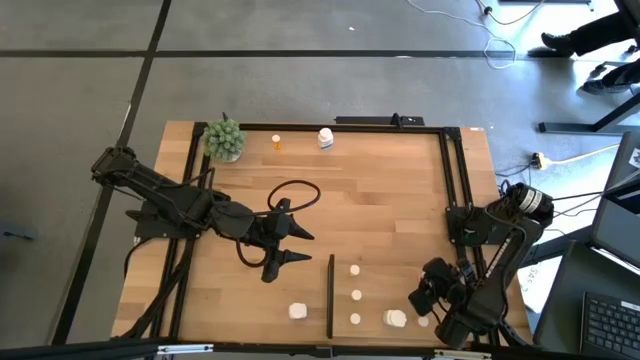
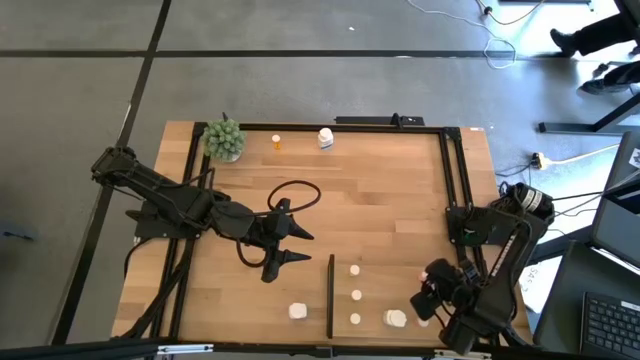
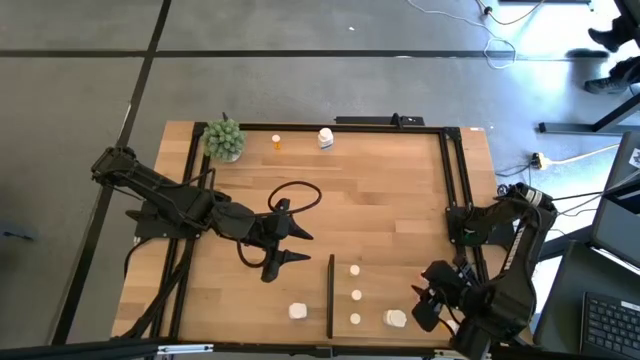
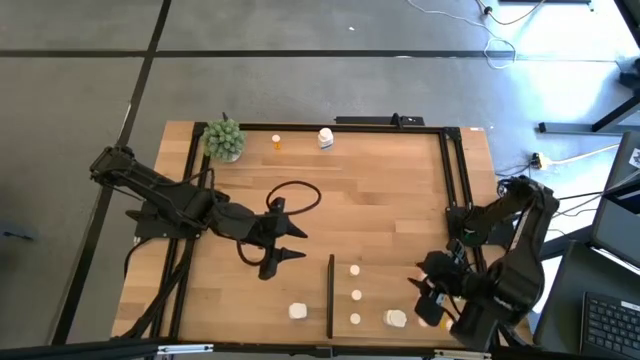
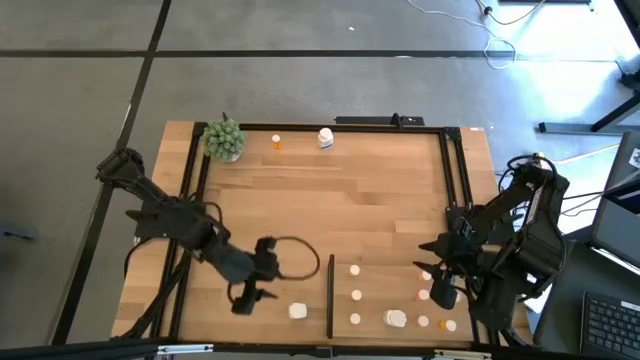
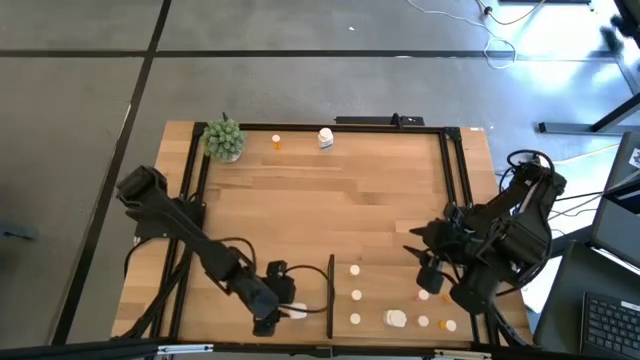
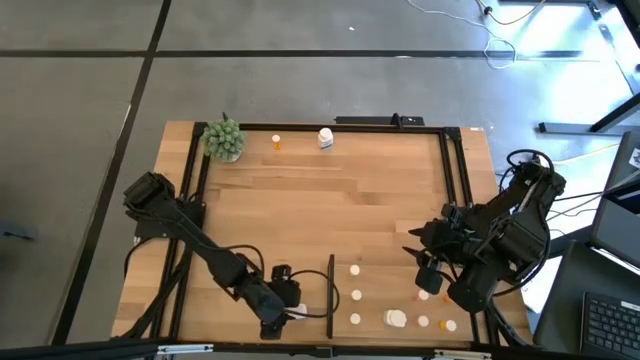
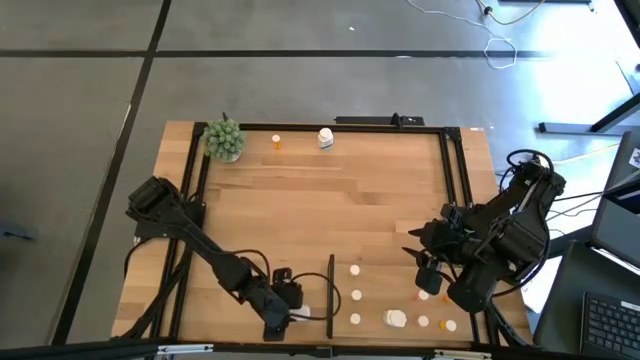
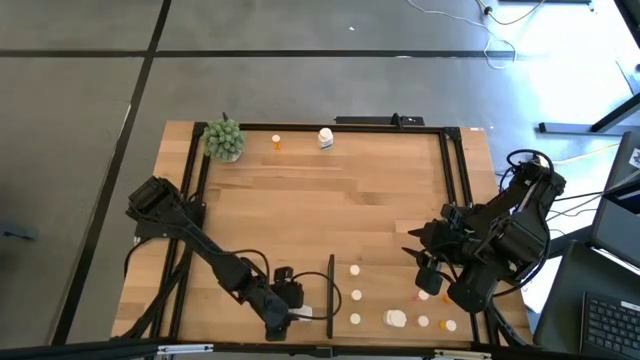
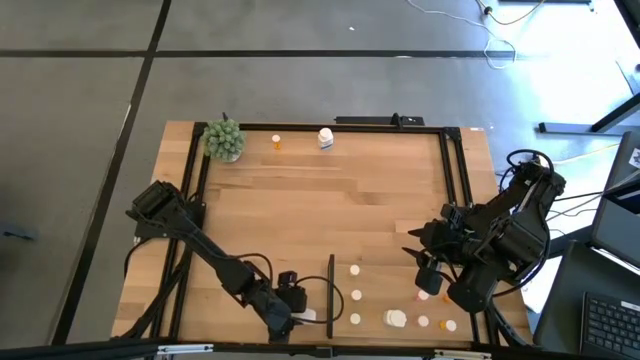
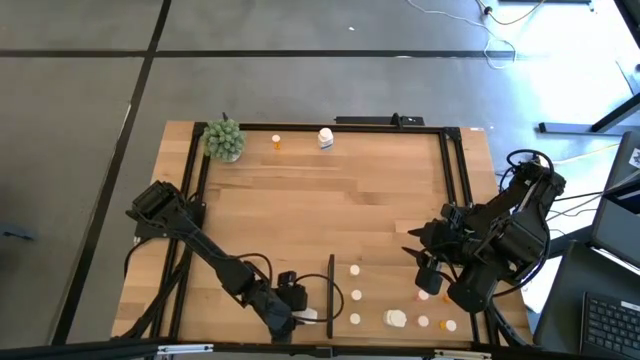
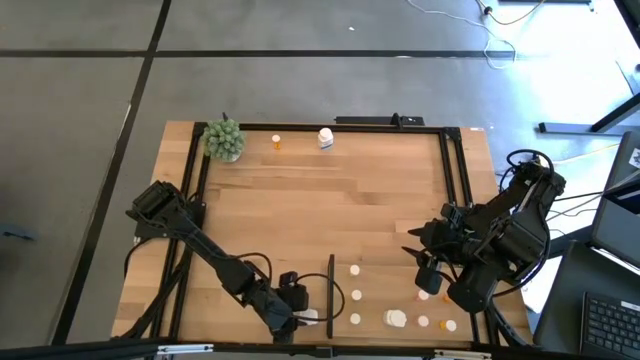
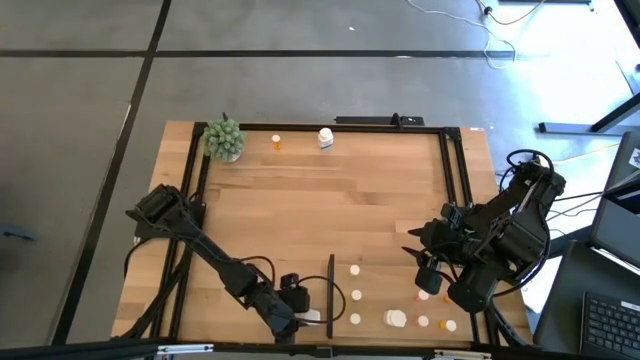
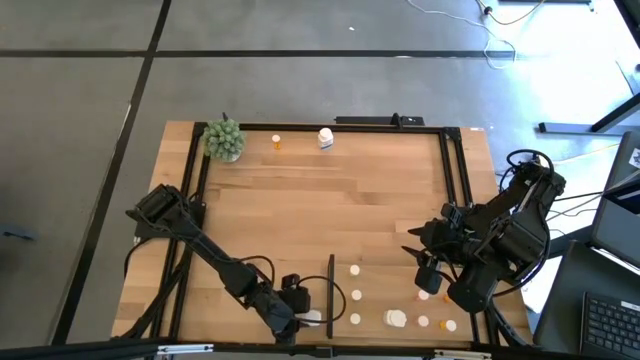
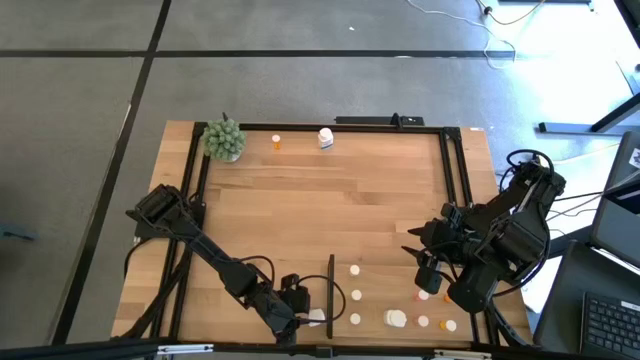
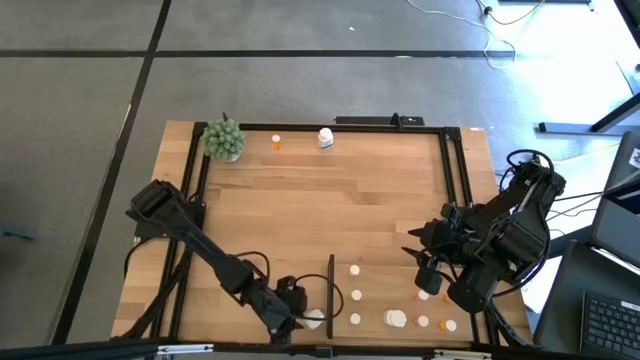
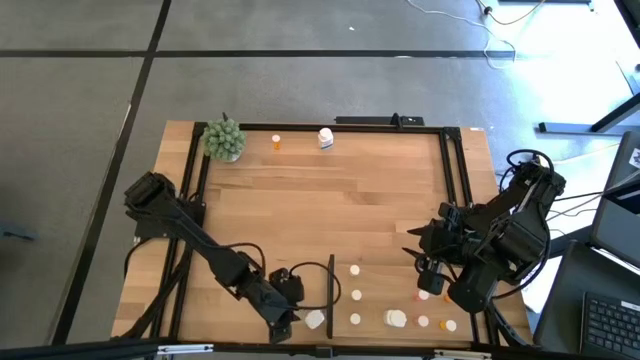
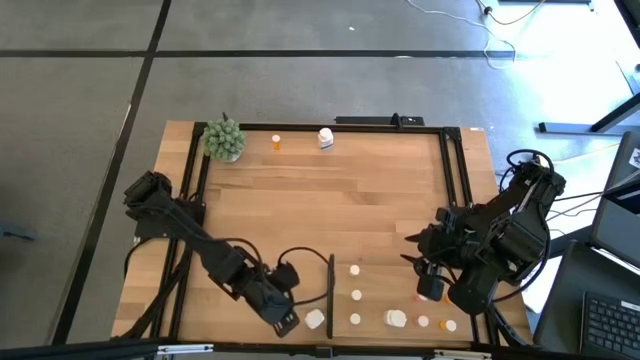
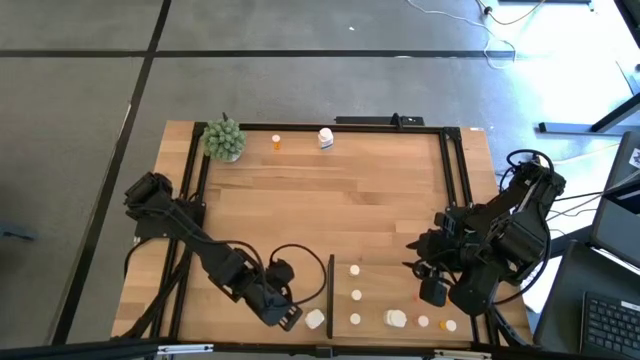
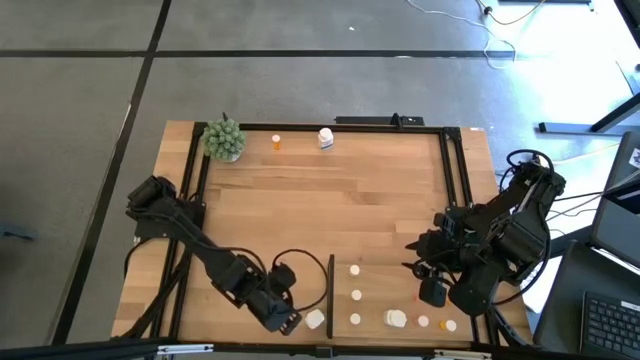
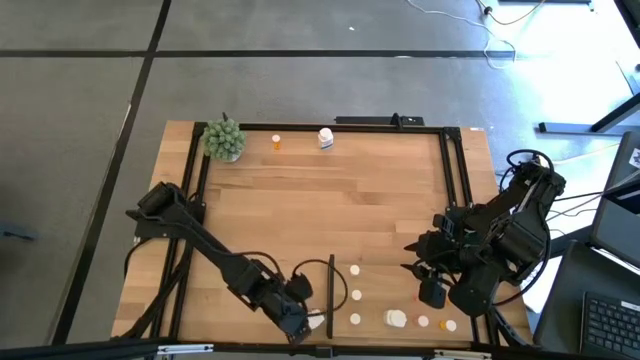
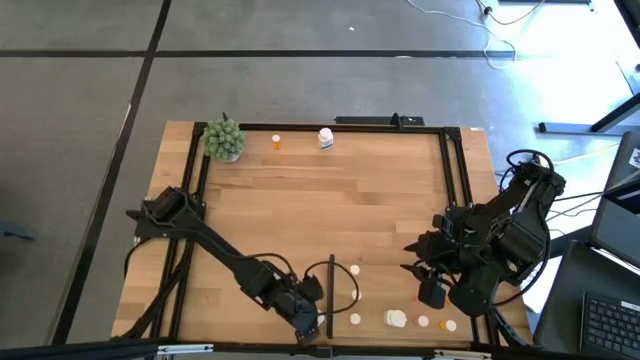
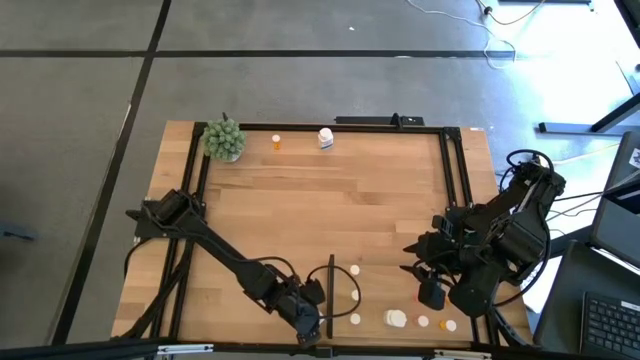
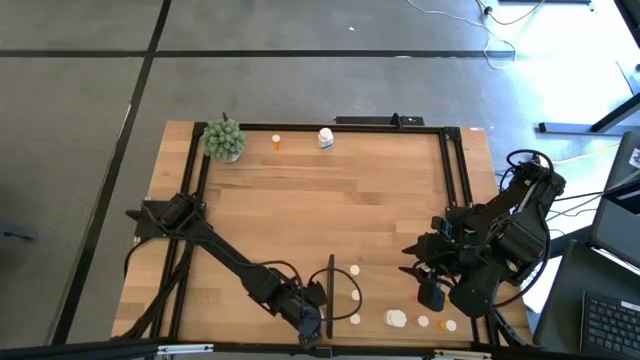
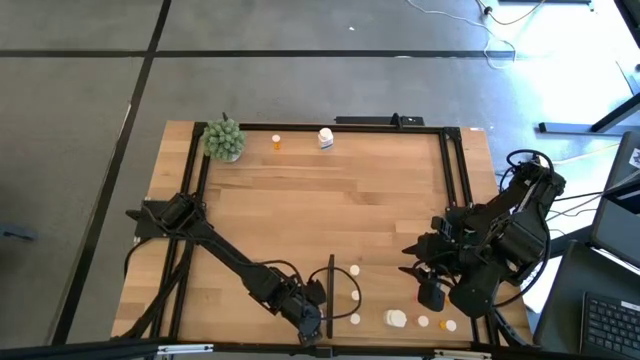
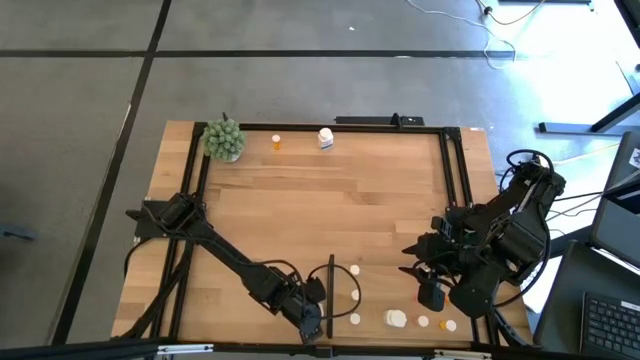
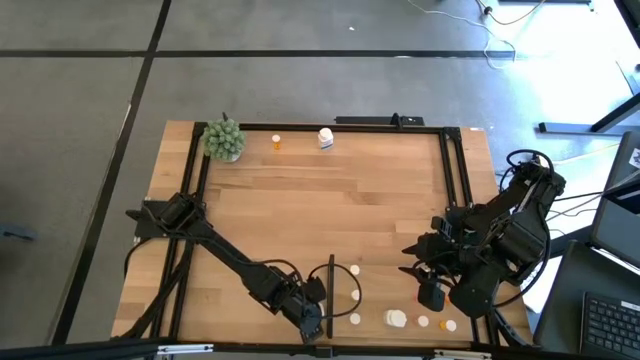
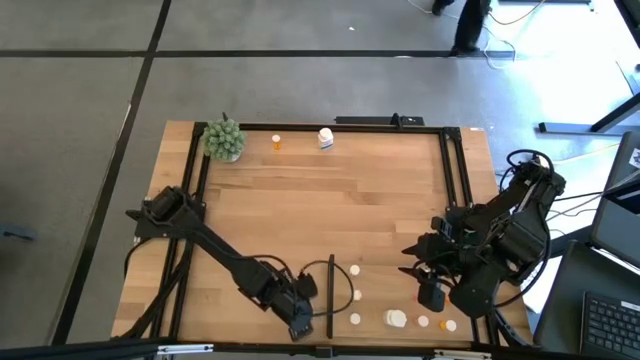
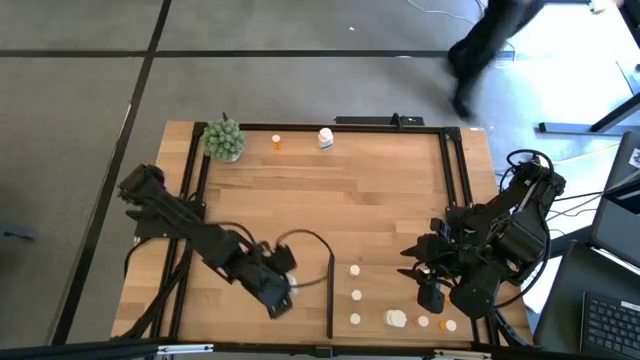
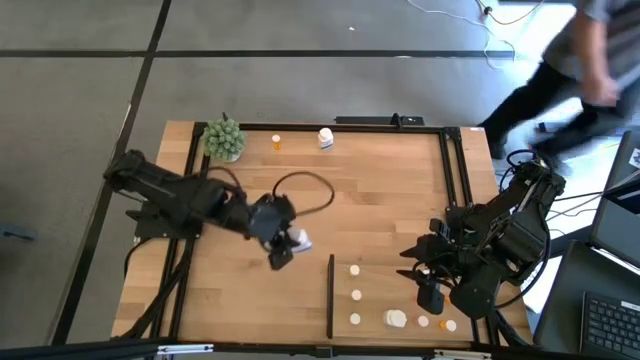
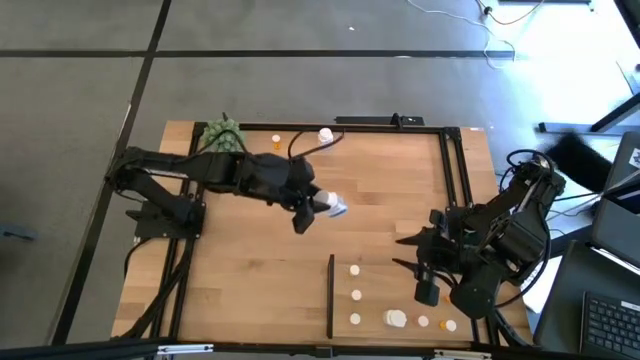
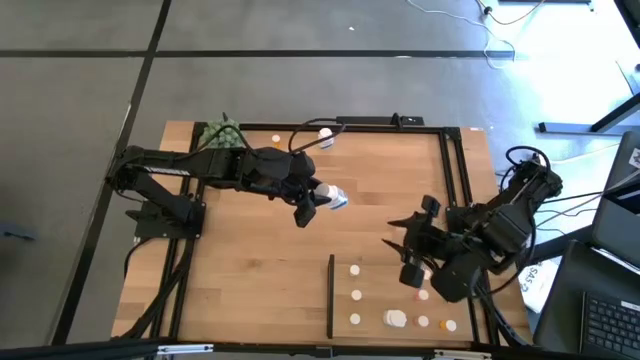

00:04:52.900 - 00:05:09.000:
Task: Pick and place medicine bottles onto shelf by color
Put the bottom supplement bottle on the shelf aligned with the other supplement bottle

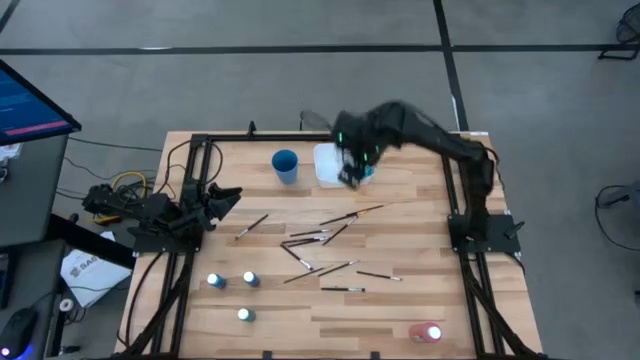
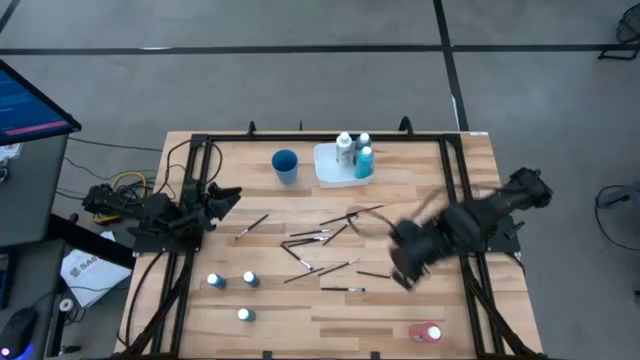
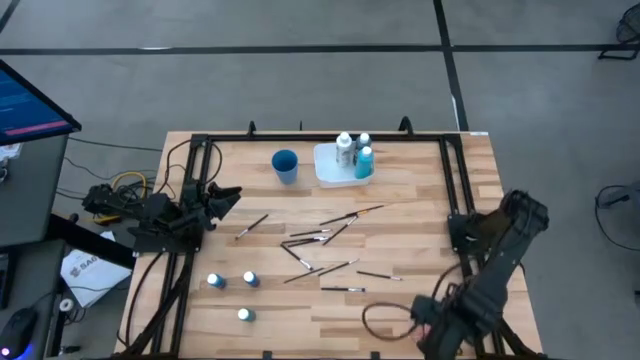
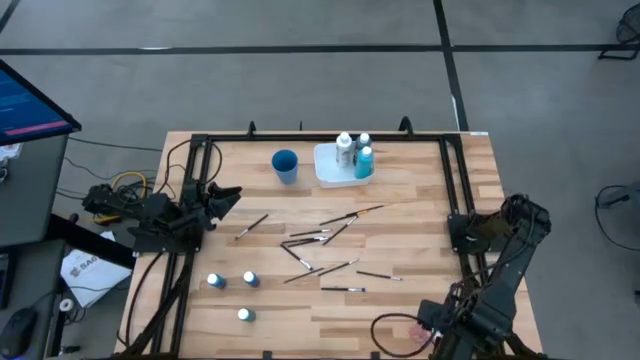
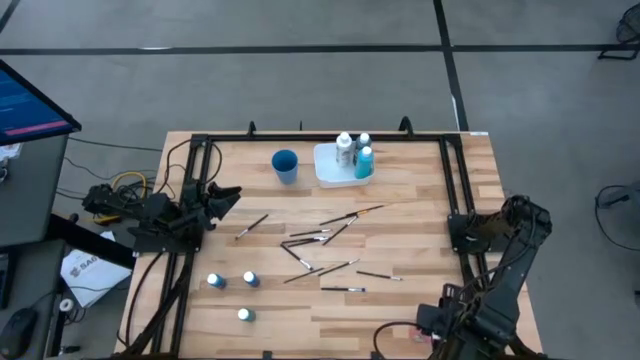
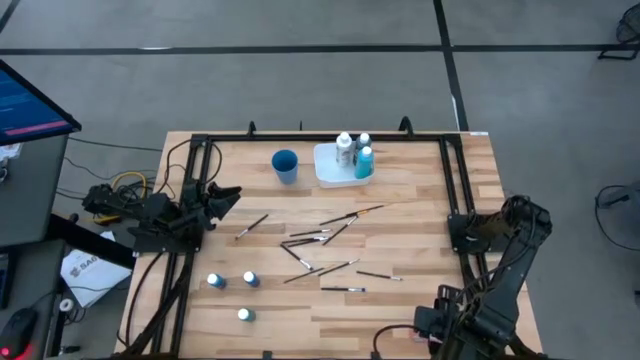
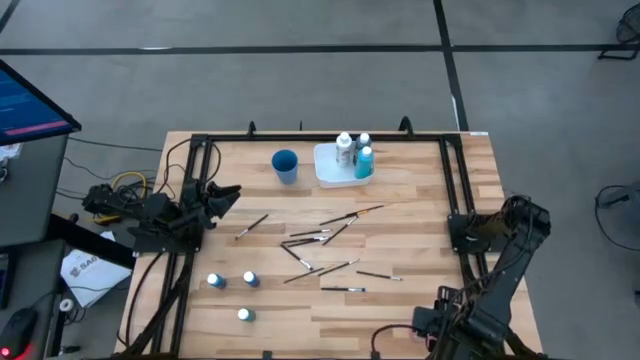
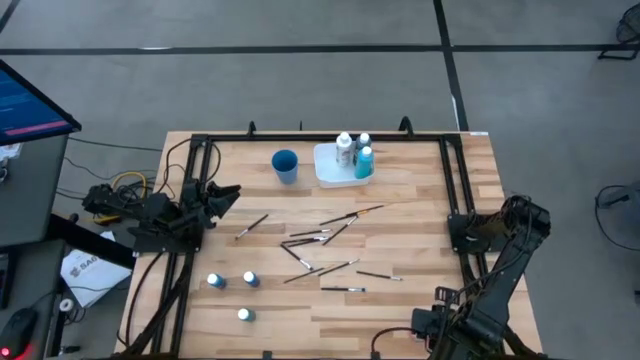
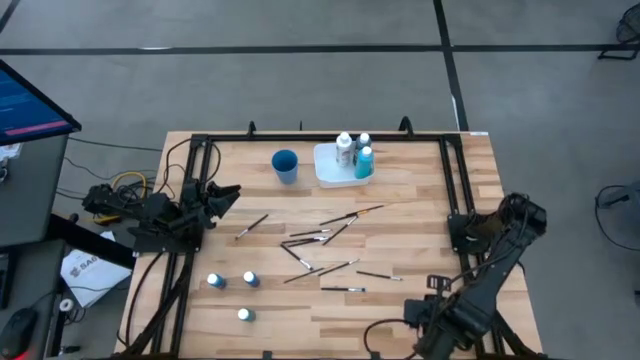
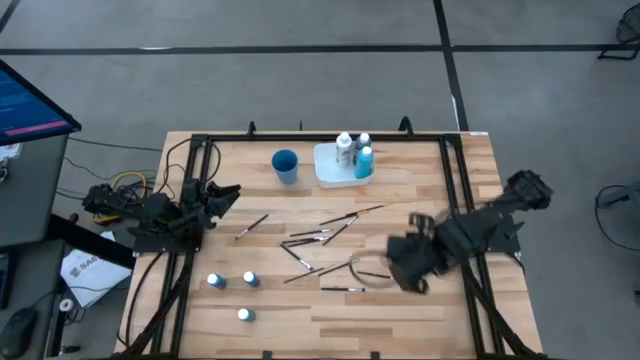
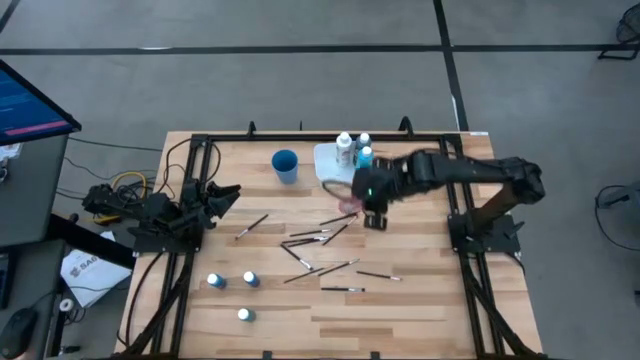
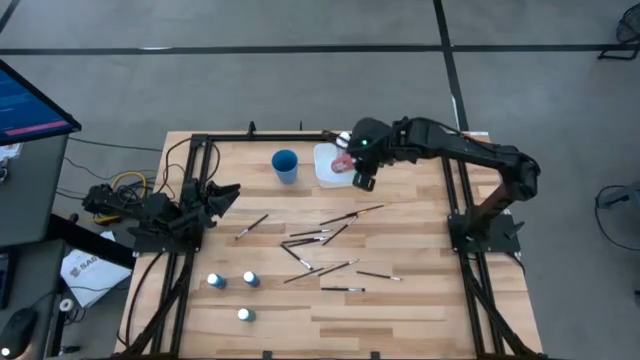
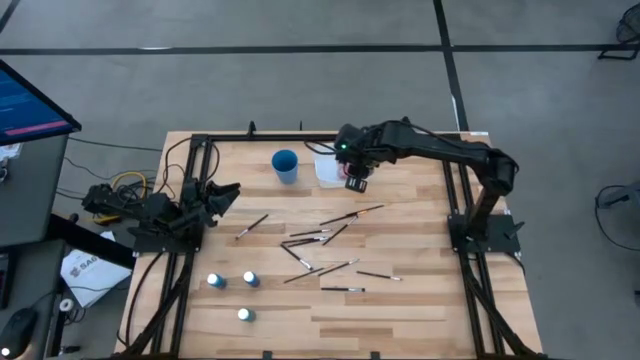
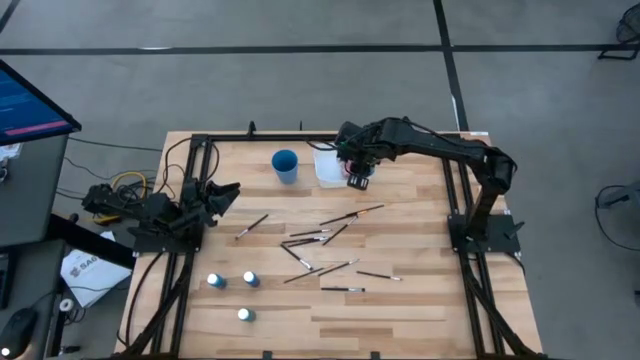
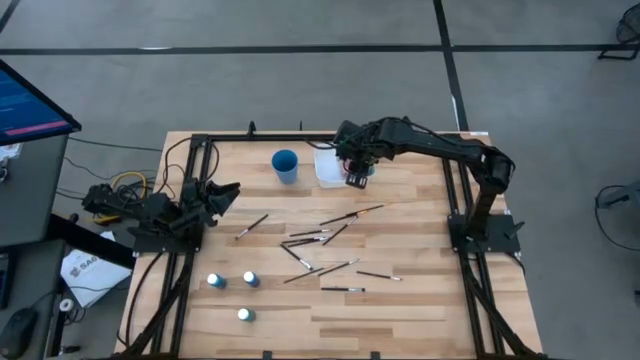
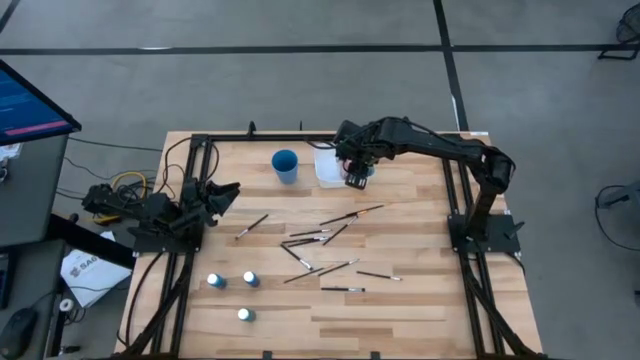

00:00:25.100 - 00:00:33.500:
Task: Pick & Place Paint Supplies
Put the red paint bottle into the white bin
